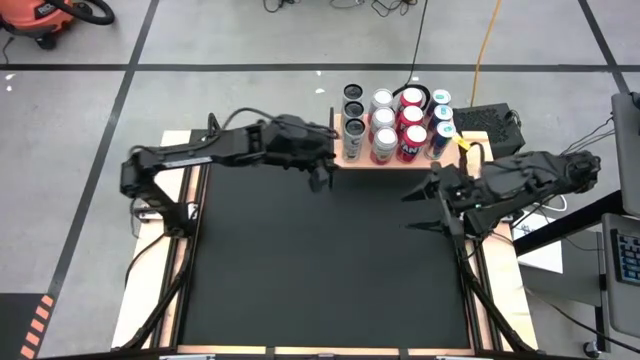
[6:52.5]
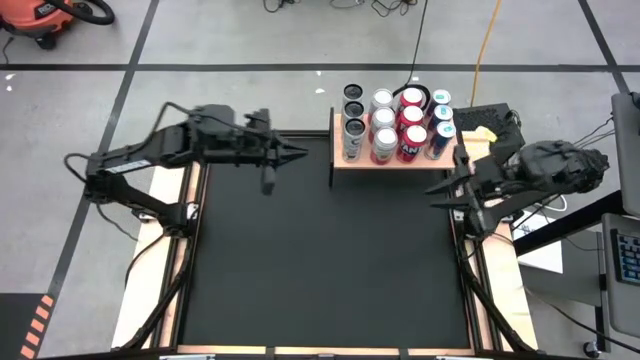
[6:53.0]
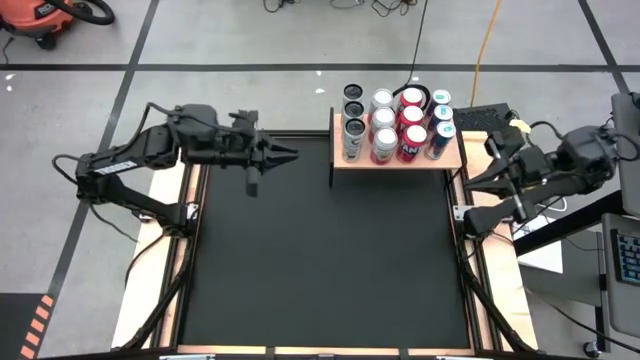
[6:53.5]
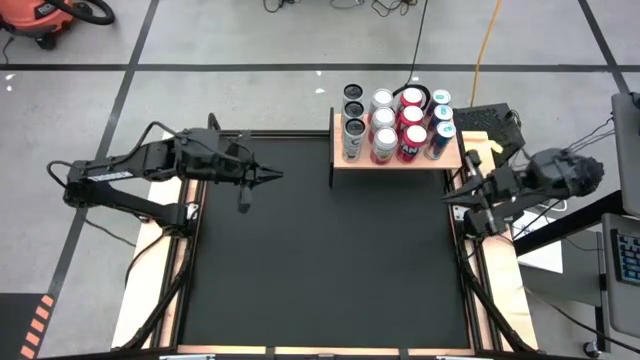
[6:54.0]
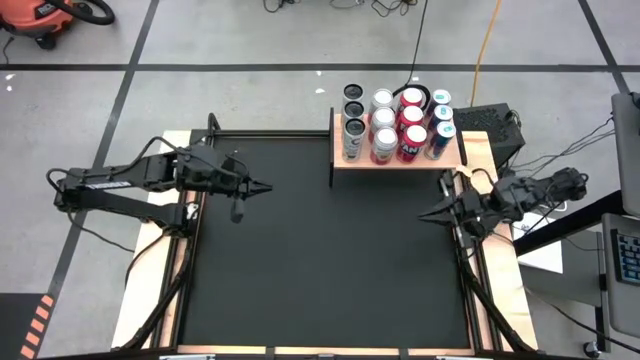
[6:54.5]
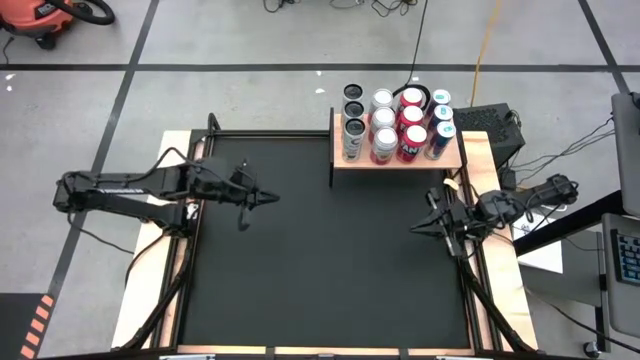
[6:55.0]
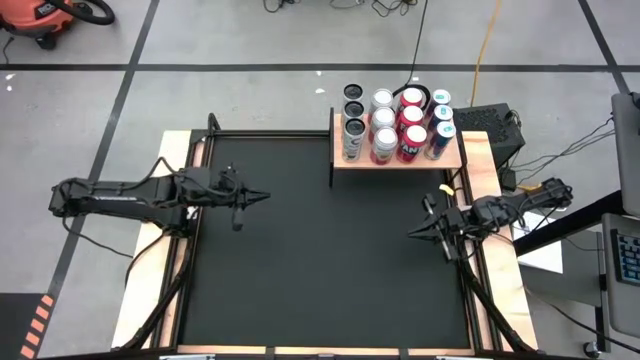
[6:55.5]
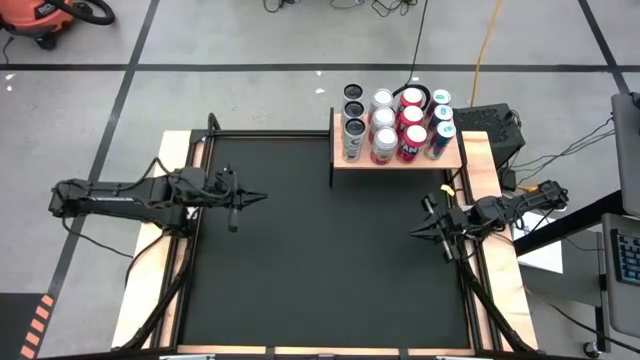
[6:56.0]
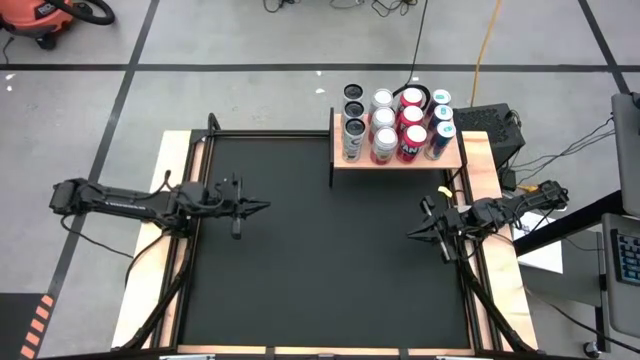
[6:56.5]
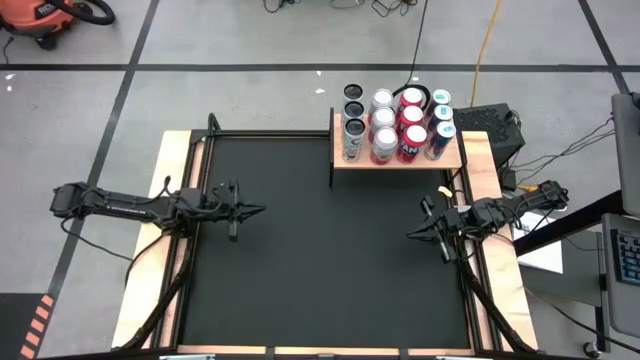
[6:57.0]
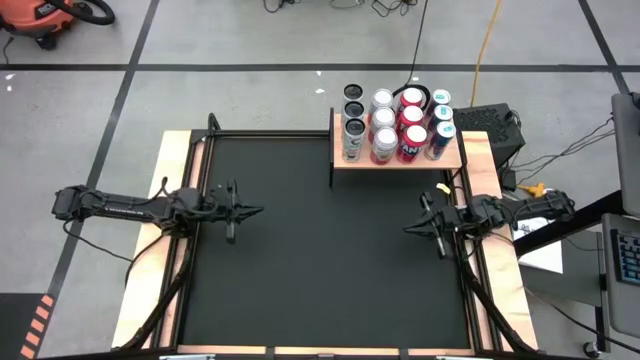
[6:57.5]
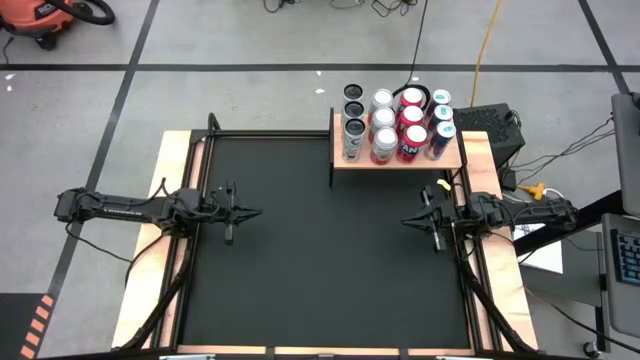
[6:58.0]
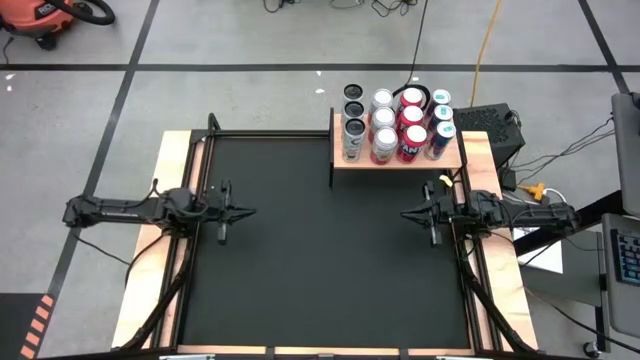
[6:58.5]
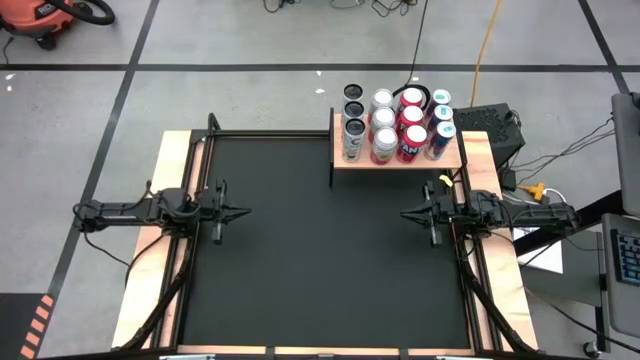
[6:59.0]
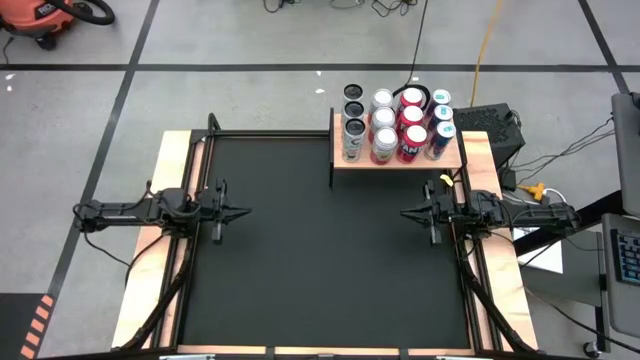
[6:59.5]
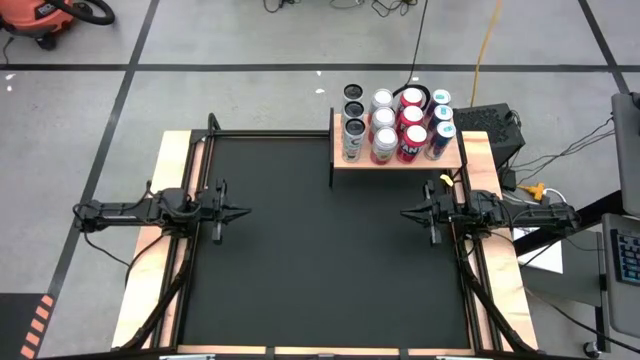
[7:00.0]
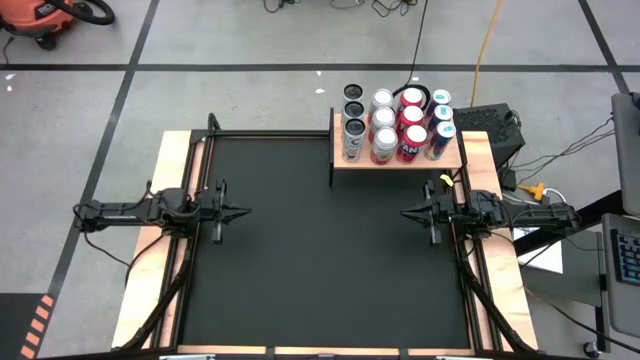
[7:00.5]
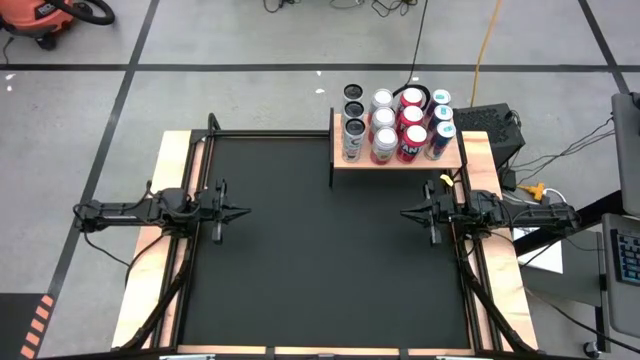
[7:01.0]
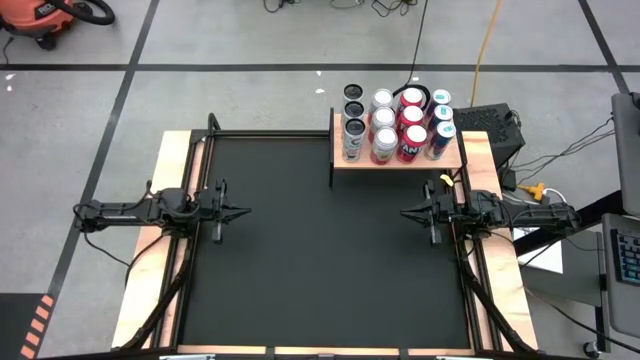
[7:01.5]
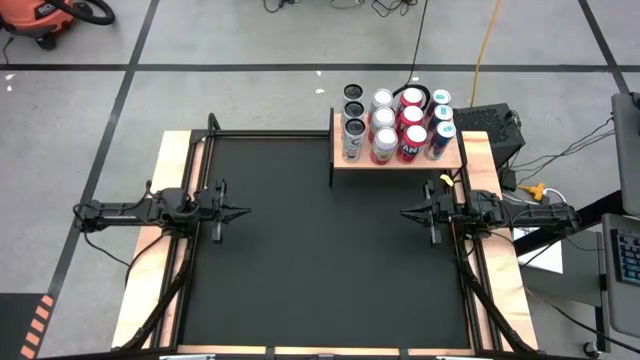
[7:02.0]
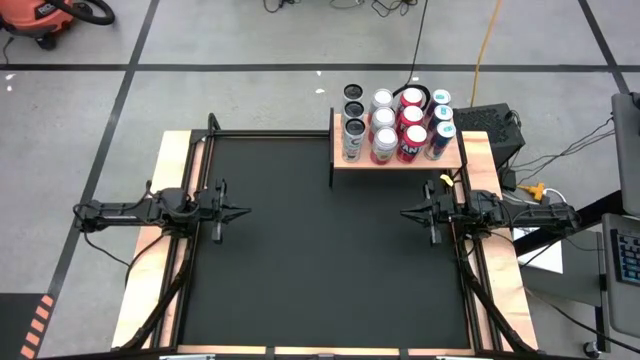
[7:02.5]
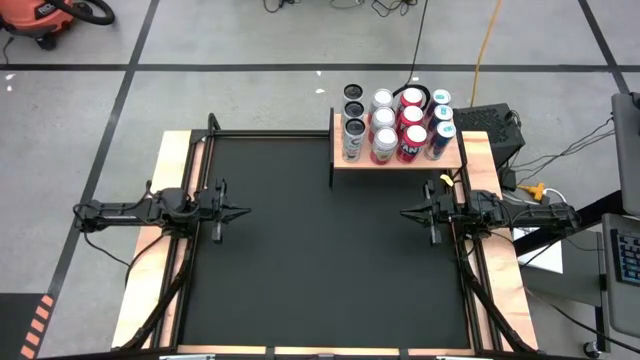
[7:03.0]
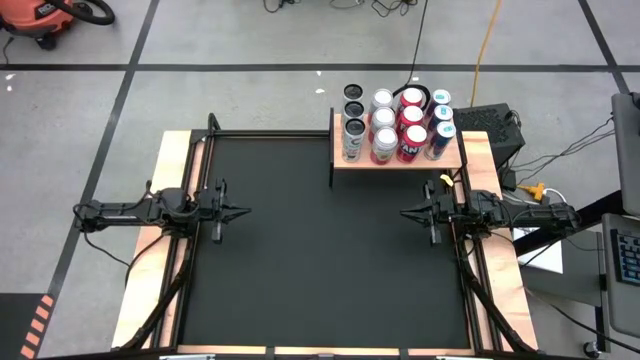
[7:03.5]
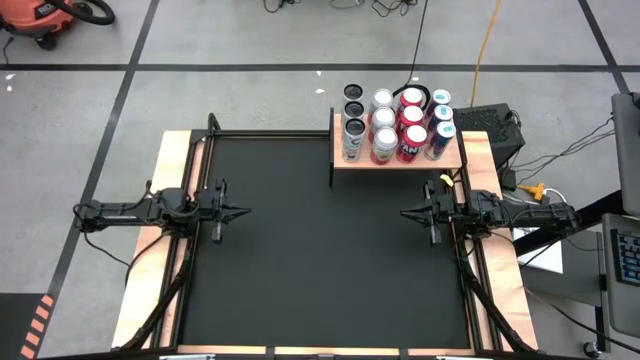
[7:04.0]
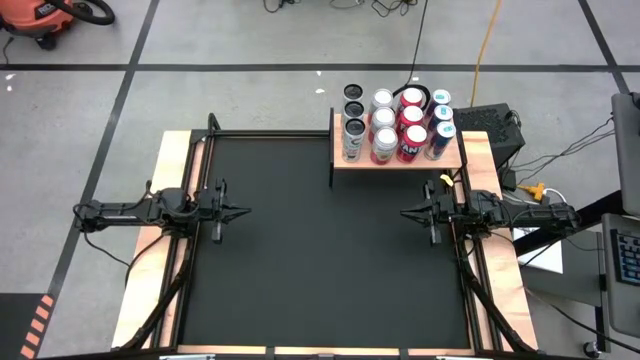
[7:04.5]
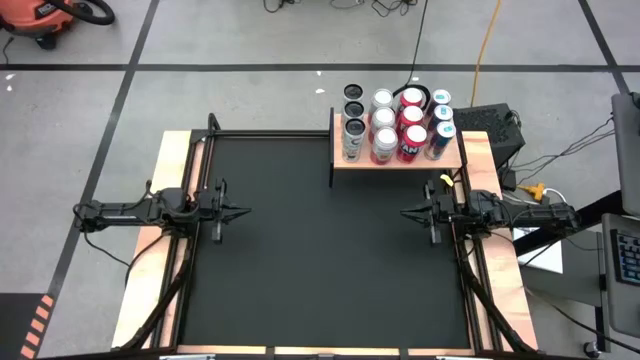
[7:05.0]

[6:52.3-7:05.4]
Task: Place canned beverage on shelf
Return to Home Position

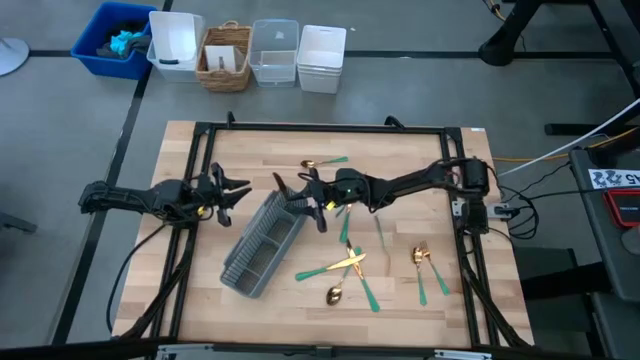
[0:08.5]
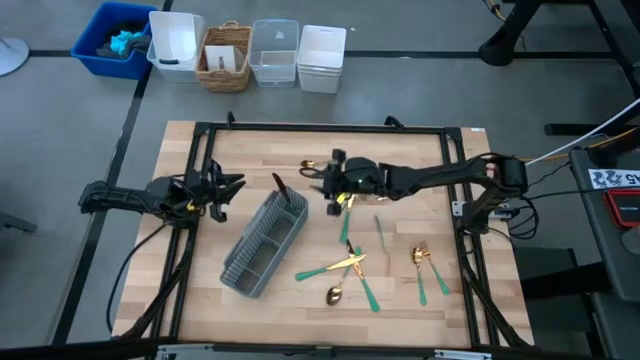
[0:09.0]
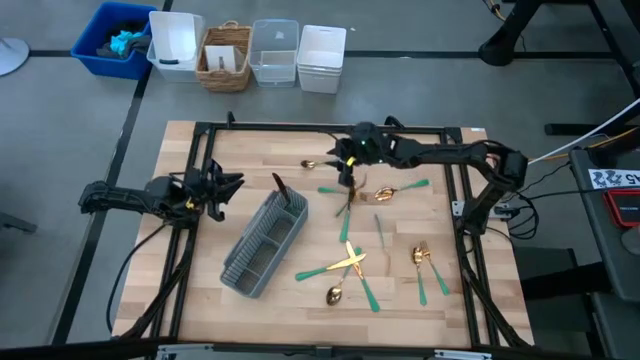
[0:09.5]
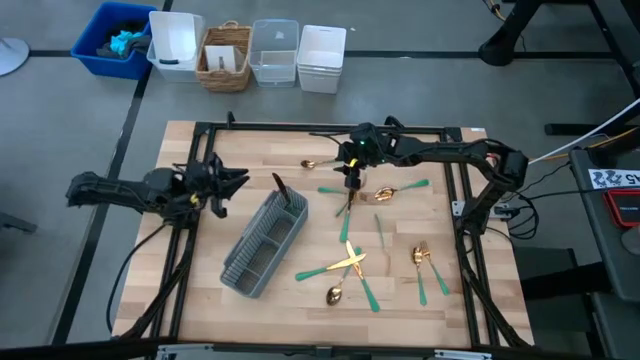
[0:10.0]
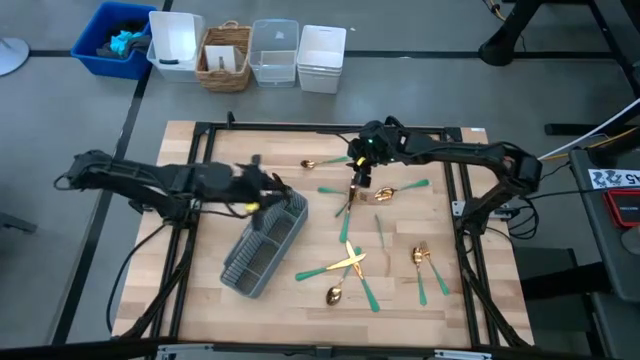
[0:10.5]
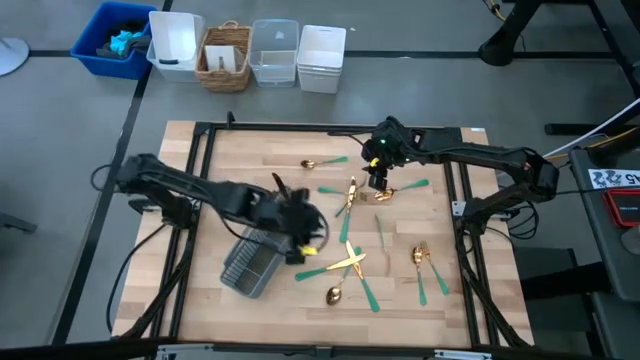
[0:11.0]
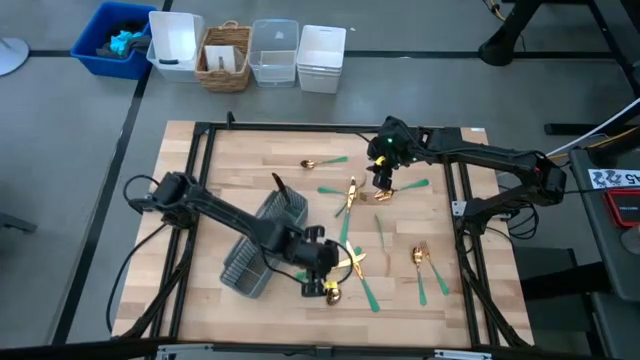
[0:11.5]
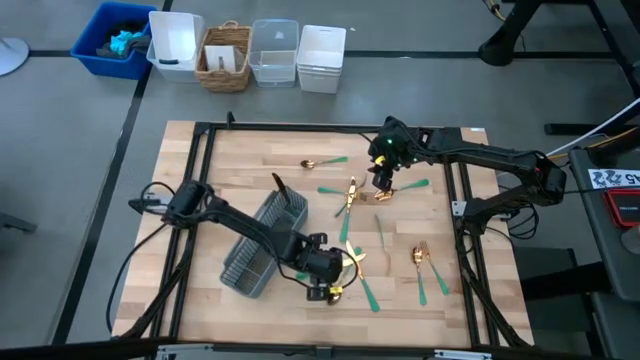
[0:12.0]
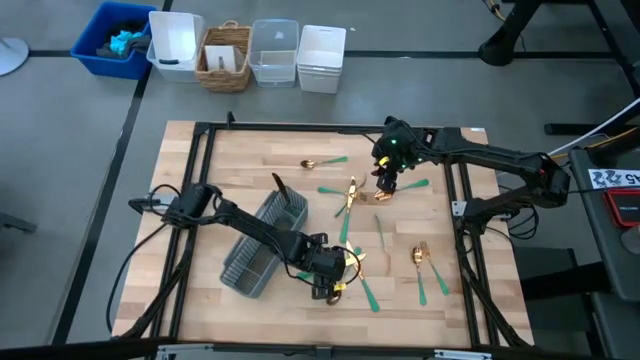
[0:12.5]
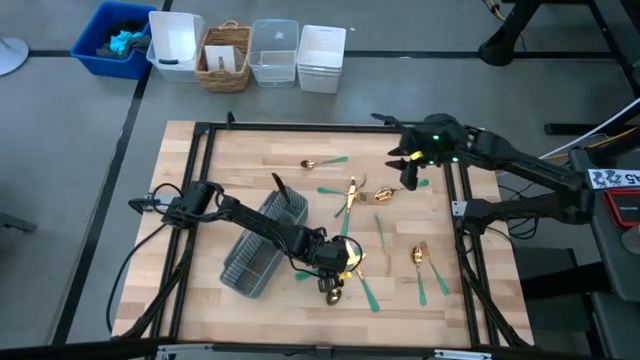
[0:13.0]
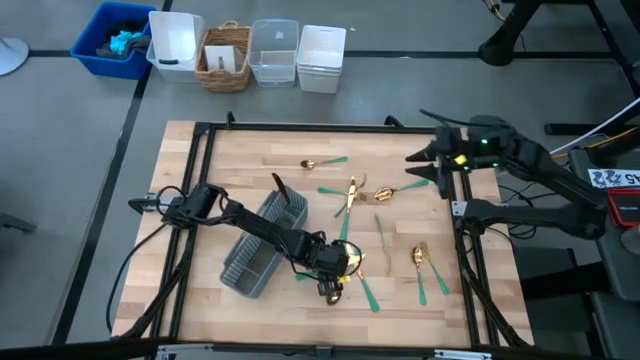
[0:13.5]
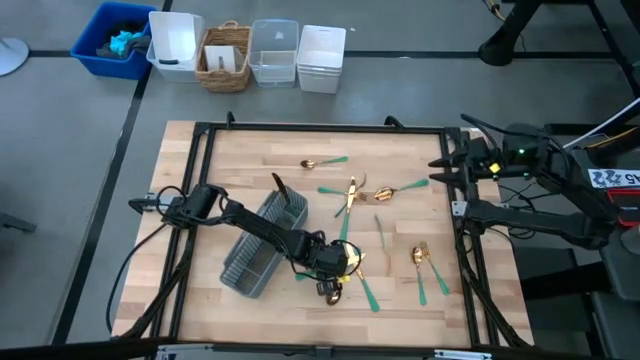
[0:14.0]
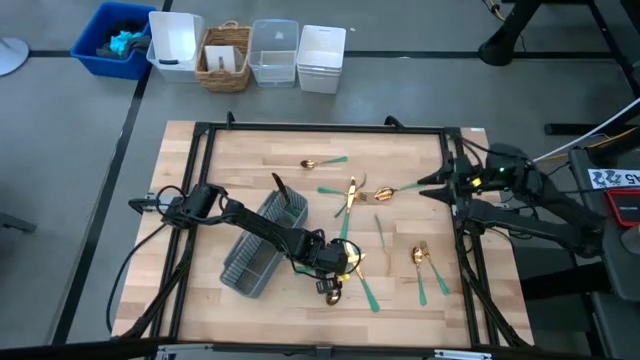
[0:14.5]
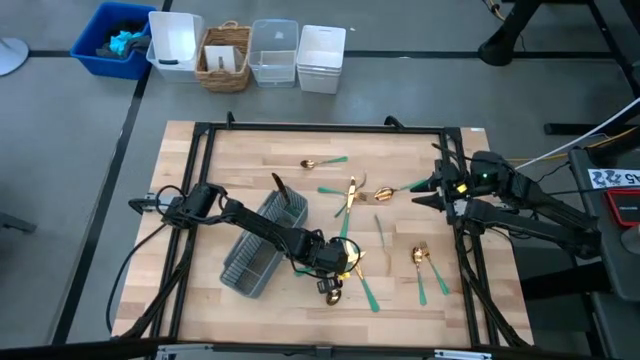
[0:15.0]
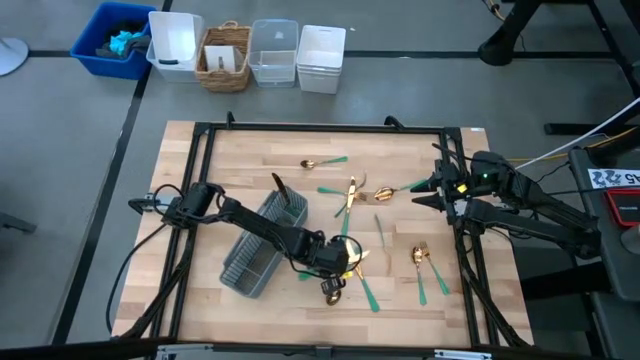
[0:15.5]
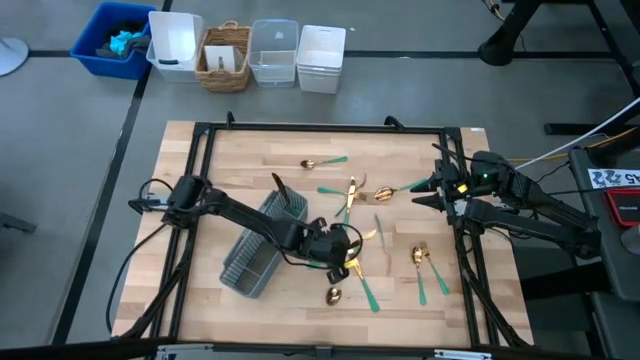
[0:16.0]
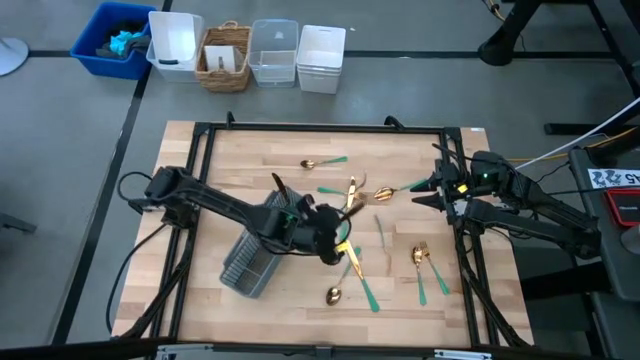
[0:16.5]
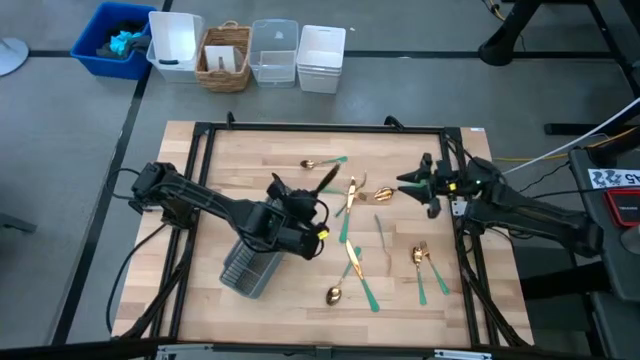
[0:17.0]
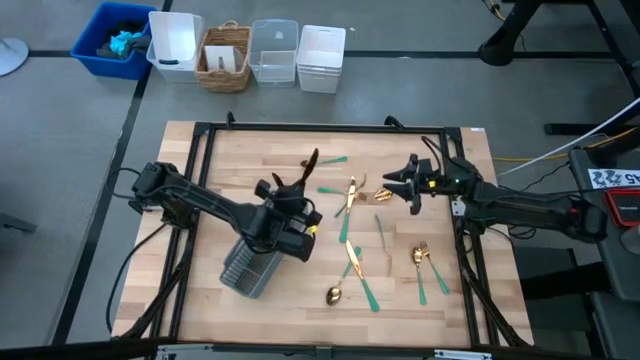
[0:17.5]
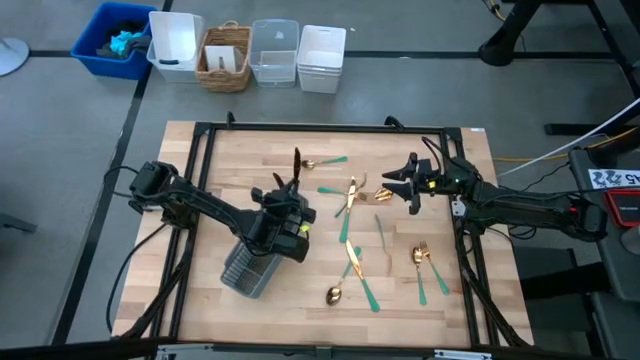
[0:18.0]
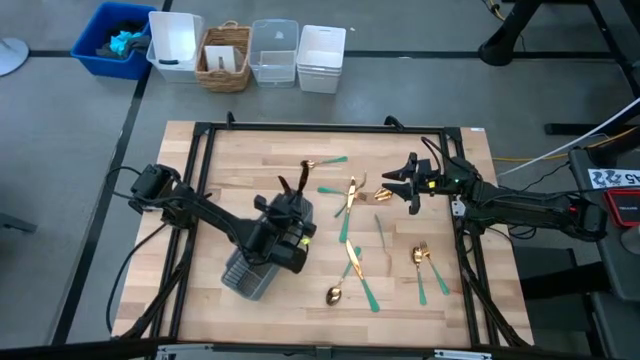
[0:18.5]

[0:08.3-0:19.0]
Task: Sort silverware
Put the green knife into the silverware basket
